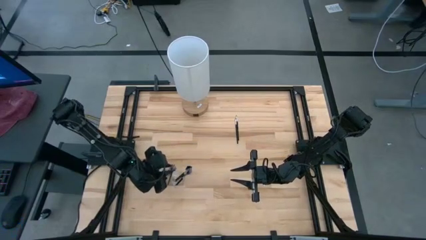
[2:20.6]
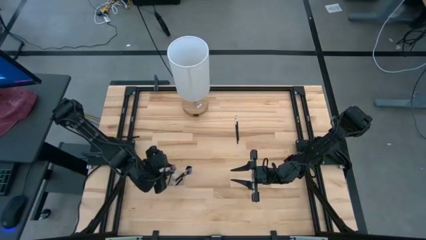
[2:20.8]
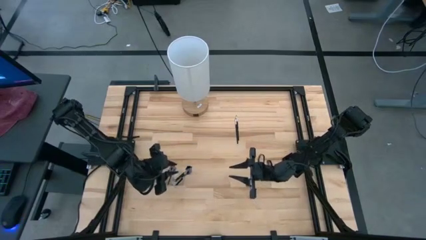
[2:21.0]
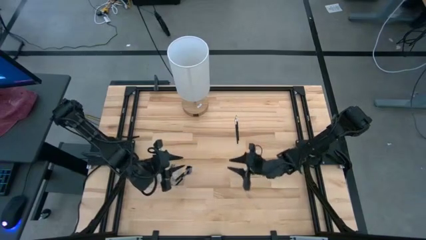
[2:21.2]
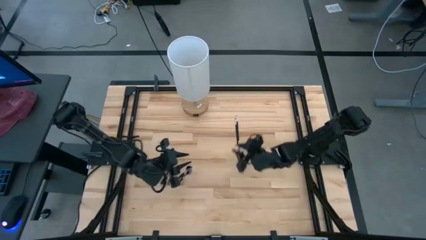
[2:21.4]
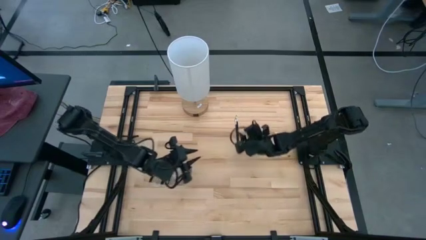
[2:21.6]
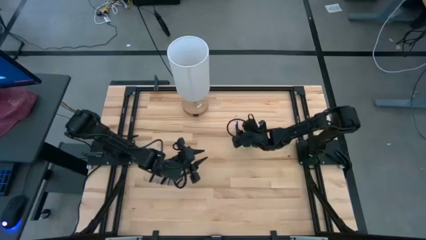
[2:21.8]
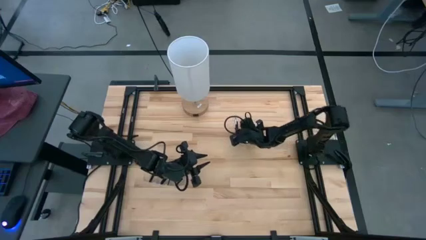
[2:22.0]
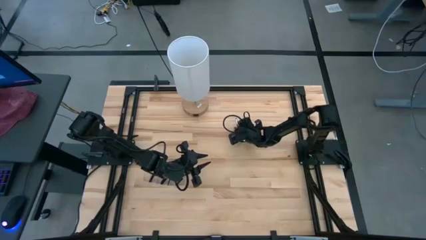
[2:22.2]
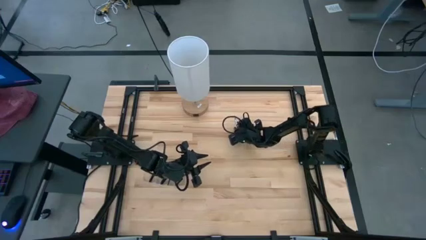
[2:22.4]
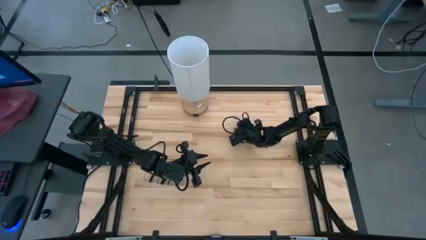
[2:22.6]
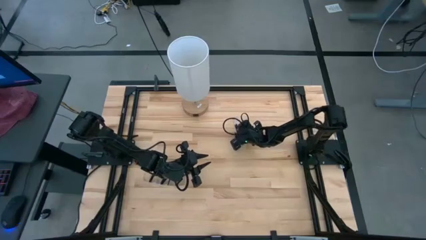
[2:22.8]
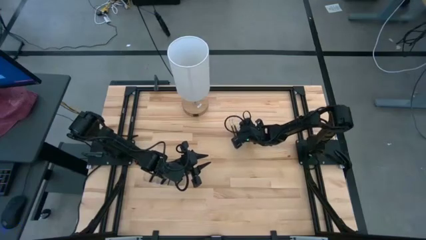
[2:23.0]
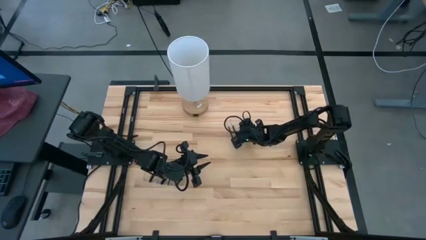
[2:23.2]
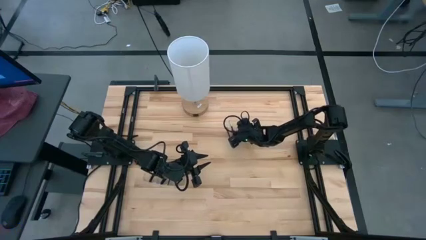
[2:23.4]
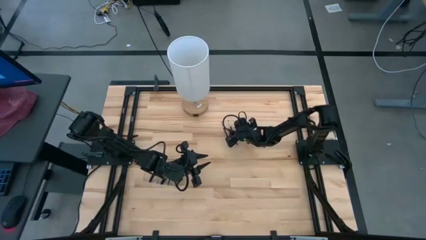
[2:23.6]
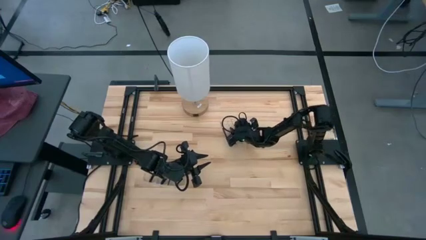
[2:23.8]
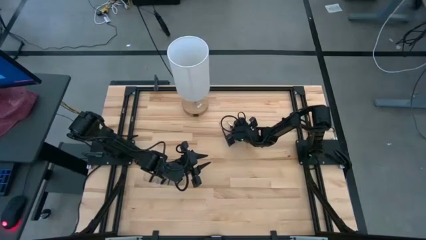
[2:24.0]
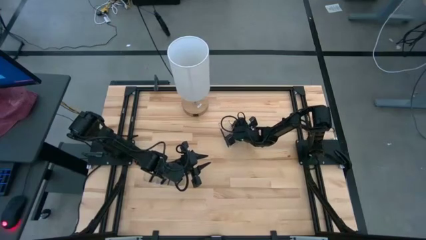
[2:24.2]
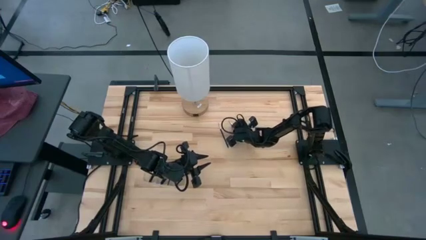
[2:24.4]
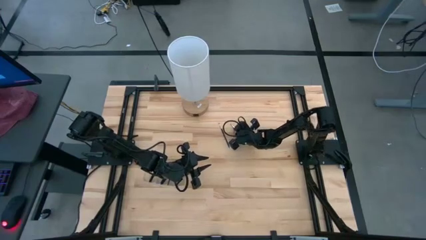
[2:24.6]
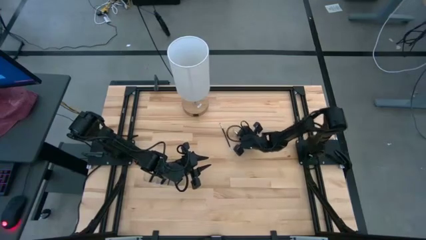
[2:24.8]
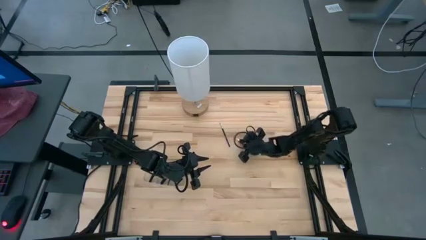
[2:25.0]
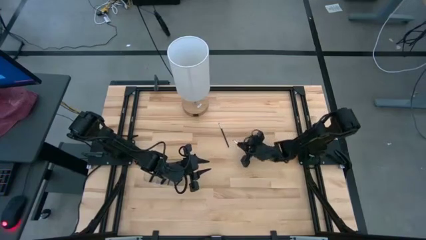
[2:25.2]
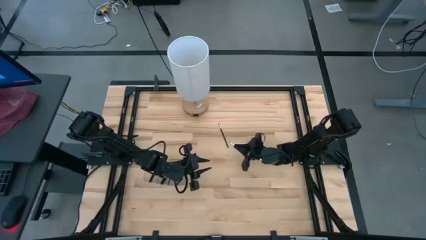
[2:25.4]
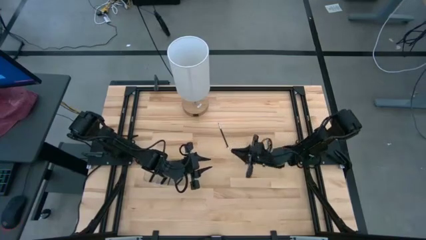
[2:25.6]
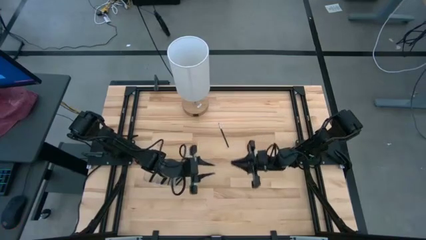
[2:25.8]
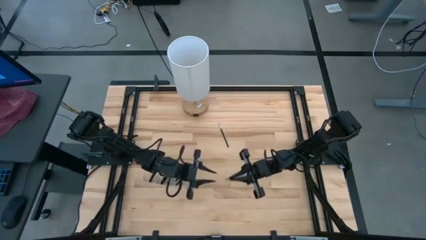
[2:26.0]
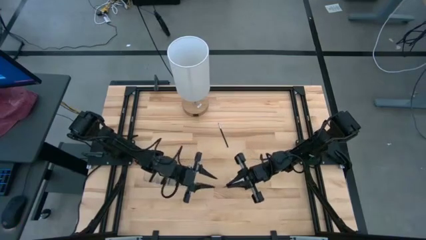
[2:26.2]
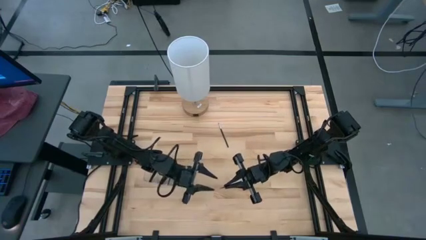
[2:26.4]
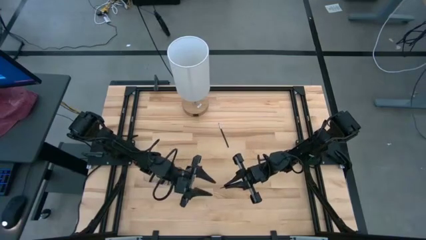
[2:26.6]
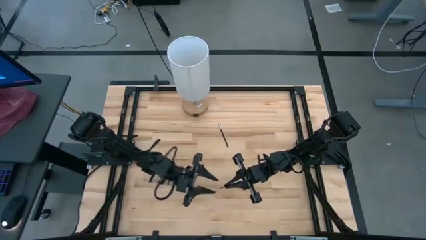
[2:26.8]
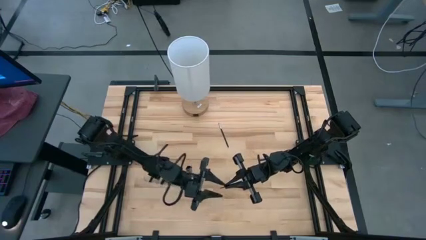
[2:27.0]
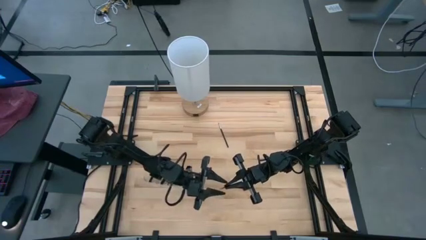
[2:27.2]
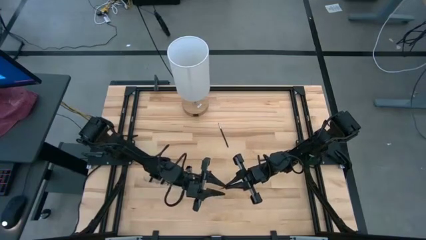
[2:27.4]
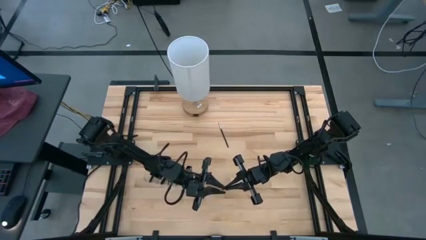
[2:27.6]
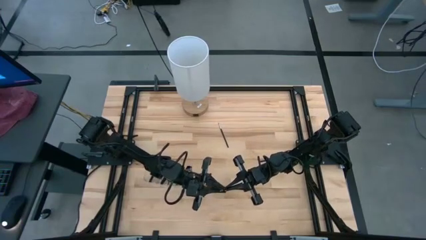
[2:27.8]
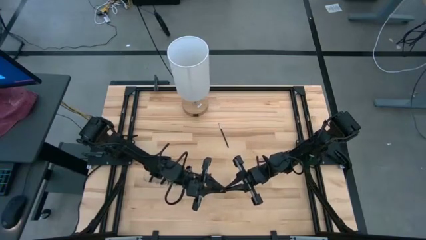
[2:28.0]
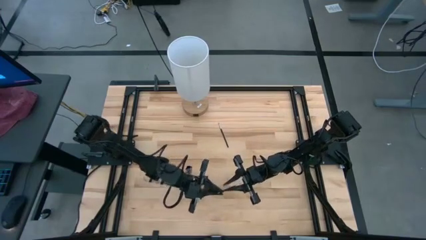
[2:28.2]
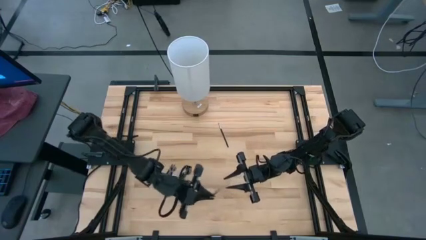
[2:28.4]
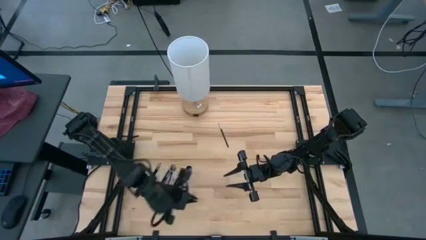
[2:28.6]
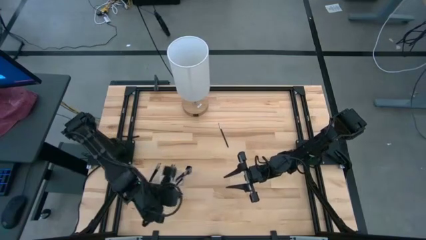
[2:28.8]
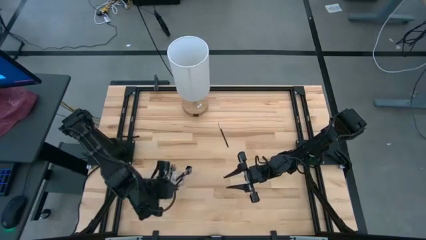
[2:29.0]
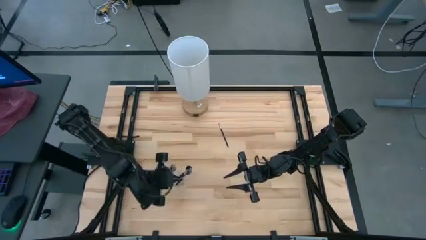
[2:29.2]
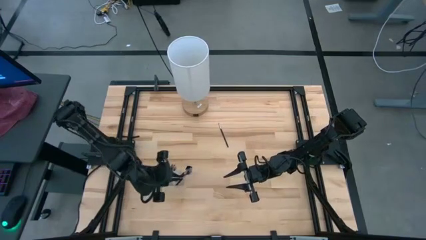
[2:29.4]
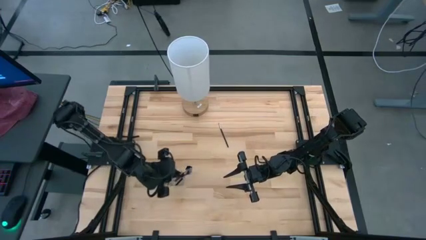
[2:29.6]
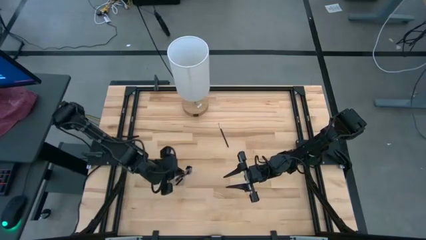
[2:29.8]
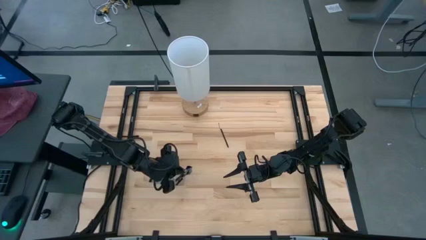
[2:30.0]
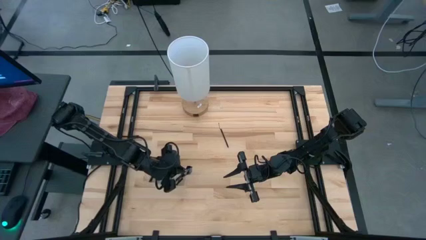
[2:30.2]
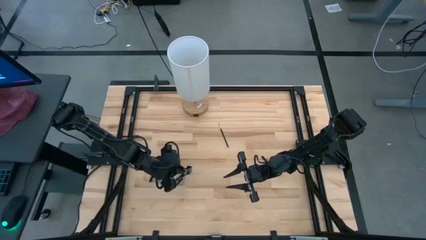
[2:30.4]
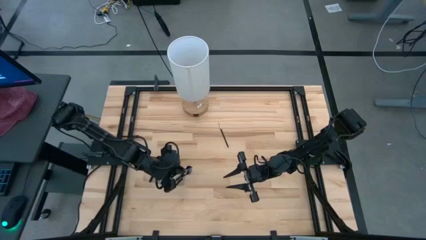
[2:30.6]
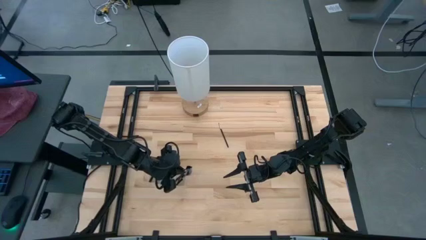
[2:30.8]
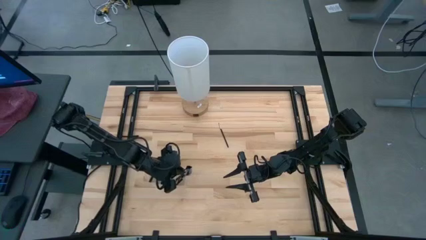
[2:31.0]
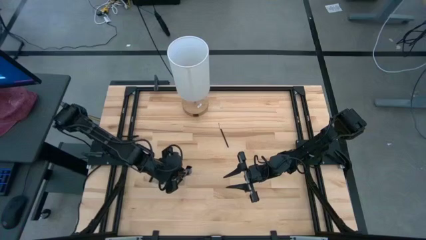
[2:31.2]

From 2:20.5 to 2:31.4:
Task: Put items in baskets/containers
Put the eyeshadow brush in the transparent organizer

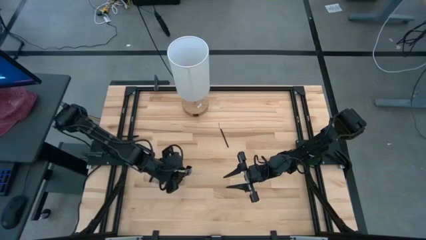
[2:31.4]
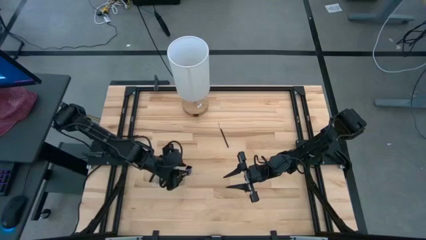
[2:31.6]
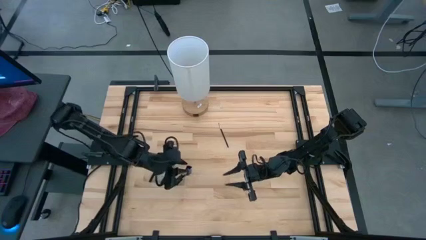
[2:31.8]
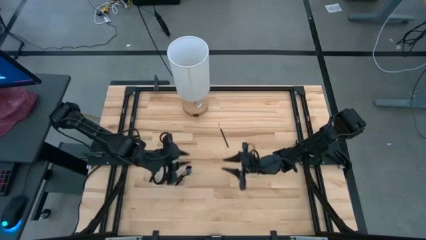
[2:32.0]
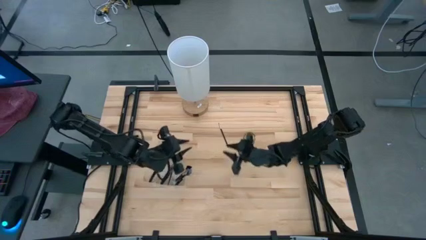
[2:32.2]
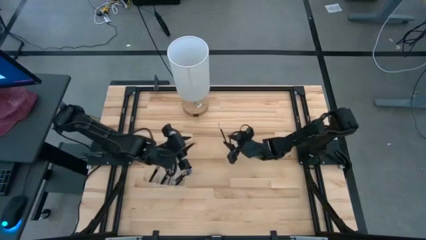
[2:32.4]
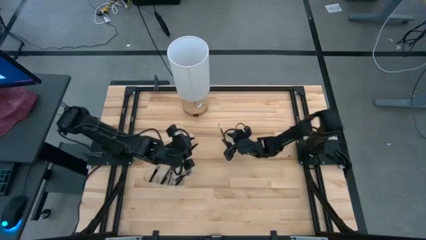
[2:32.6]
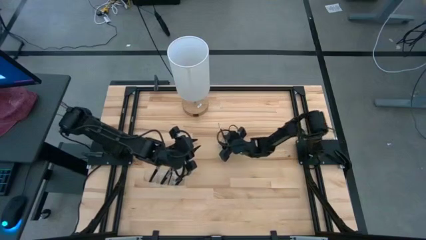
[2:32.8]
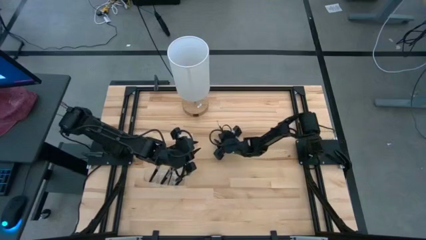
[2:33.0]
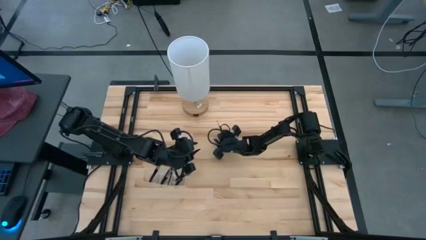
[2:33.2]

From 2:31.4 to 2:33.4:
Put the eyeshadow brush in the transparent organizer

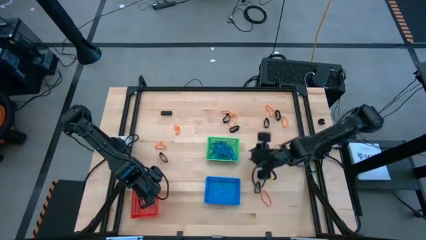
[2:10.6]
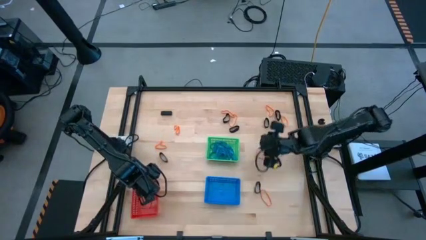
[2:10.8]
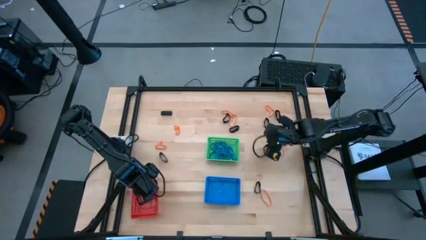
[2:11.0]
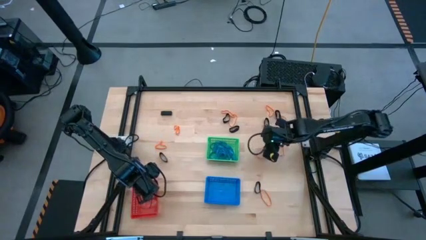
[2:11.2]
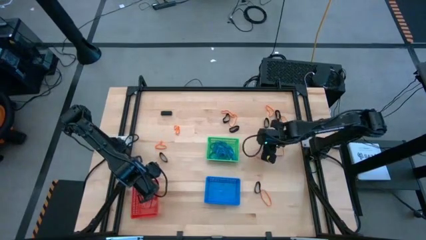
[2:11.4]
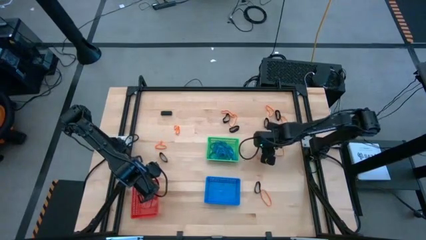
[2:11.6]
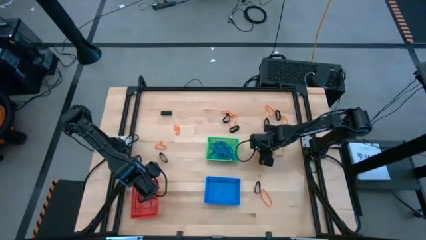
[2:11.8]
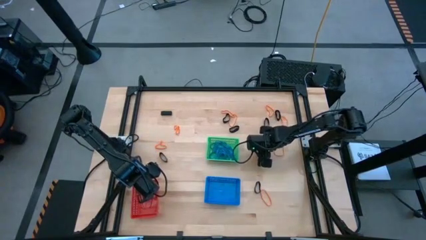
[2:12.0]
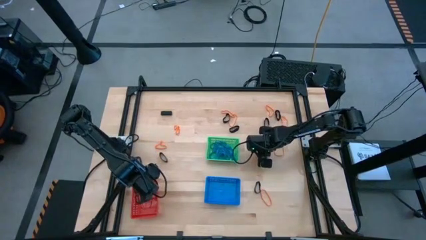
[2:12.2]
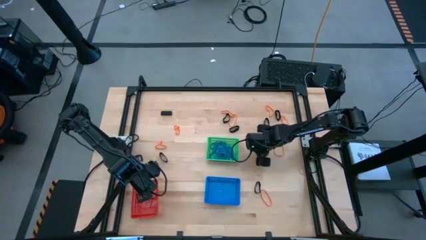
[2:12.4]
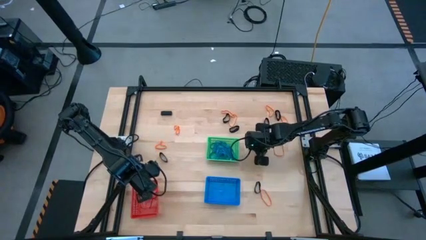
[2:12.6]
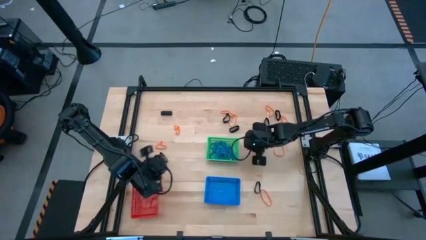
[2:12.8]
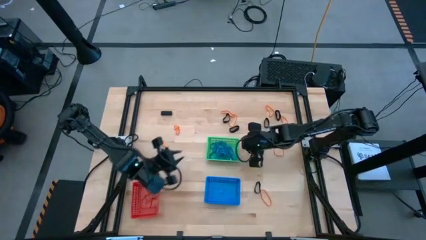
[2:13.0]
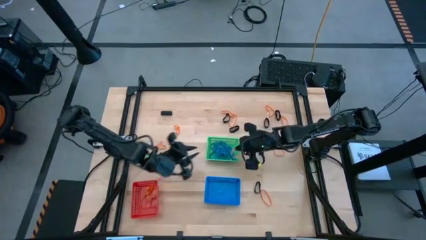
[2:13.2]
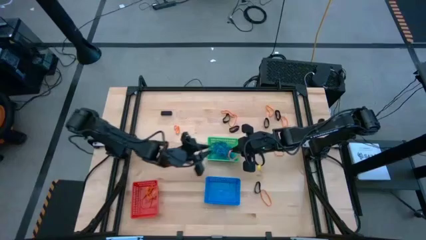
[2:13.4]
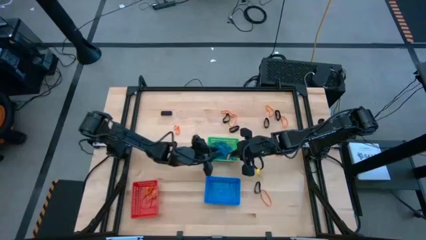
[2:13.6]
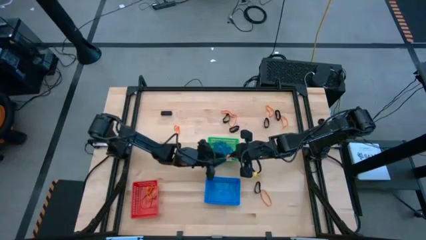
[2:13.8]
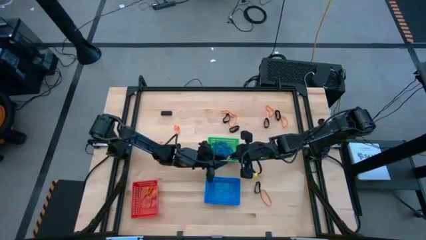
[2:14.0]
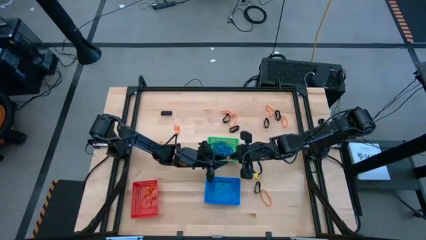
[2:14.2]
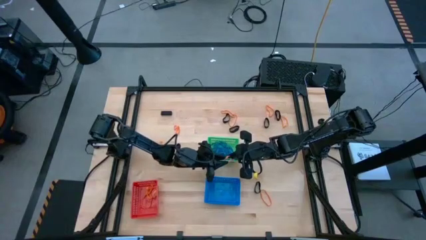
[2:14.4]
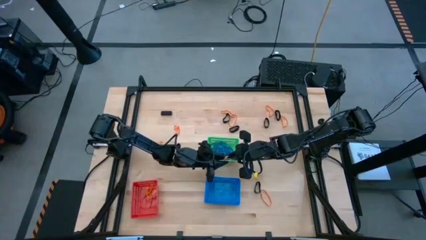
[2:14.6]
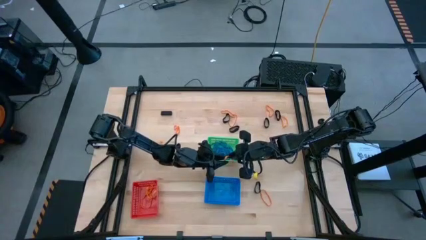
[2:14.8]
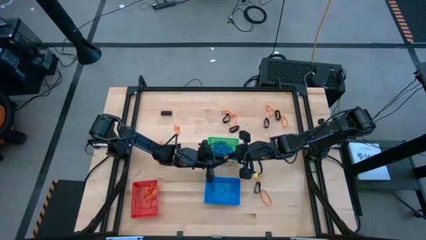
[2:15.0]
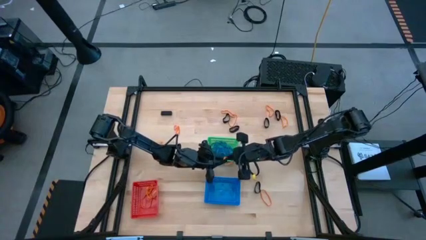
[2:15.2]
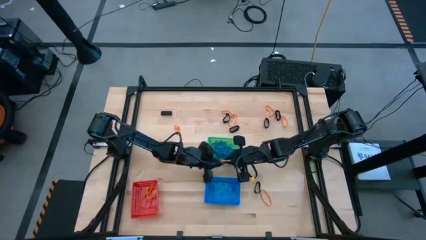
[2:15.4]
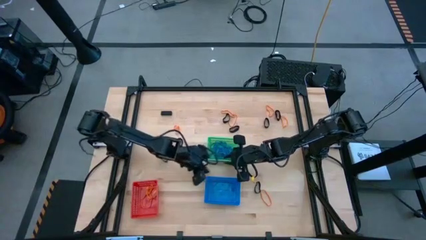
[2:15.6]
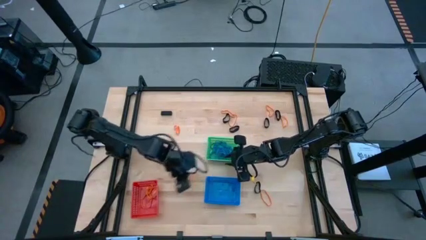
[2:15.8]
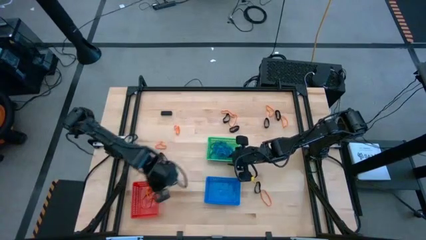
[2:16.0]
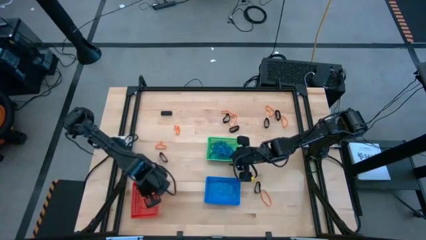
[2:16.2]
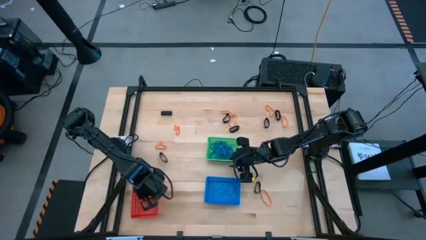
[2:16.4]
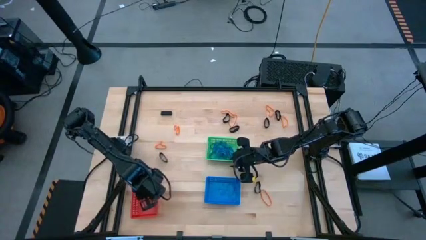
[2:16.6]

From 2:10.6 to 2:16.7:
Task: Sort rubber bands into baskets
Put the orange rubberband into the red bin
